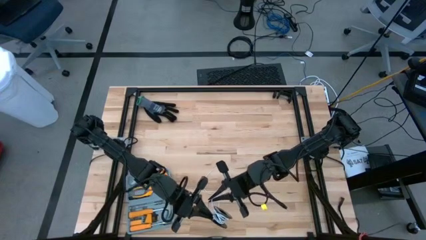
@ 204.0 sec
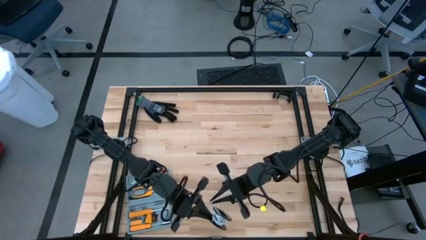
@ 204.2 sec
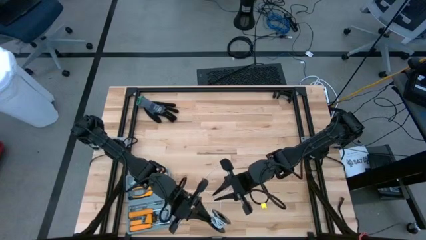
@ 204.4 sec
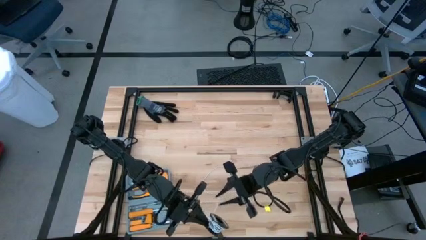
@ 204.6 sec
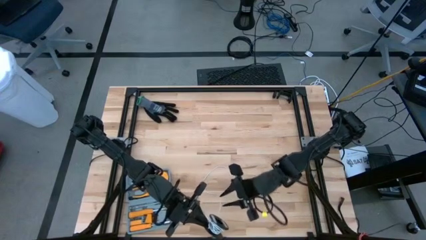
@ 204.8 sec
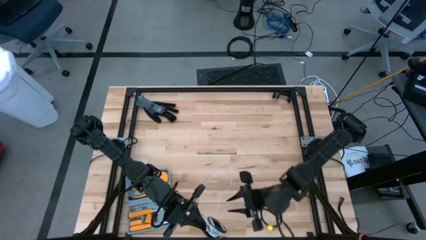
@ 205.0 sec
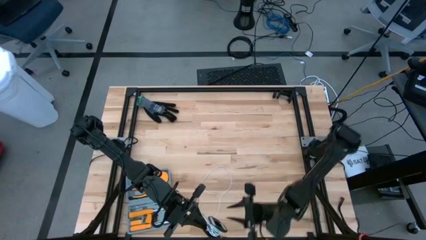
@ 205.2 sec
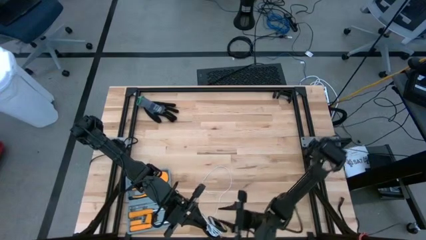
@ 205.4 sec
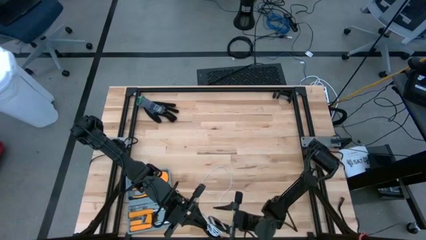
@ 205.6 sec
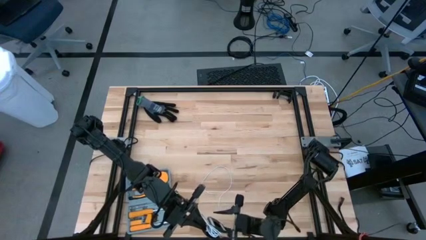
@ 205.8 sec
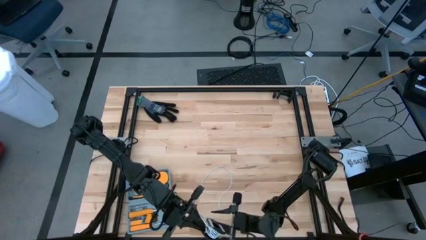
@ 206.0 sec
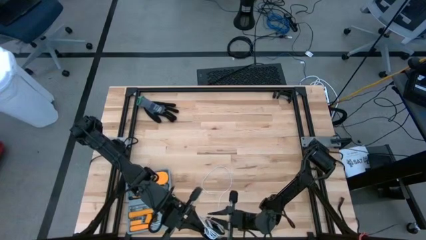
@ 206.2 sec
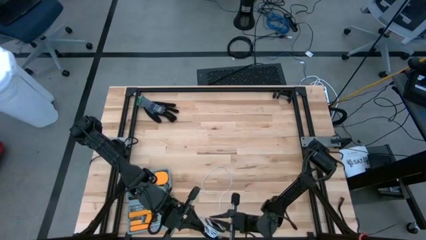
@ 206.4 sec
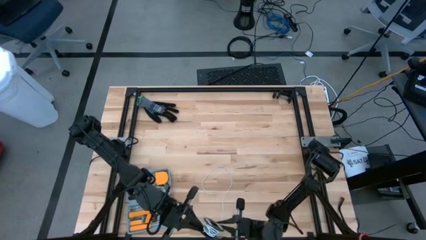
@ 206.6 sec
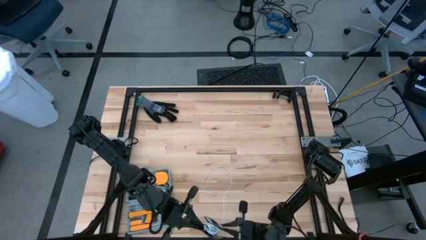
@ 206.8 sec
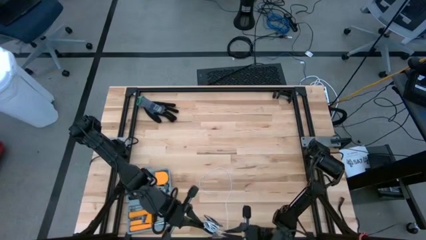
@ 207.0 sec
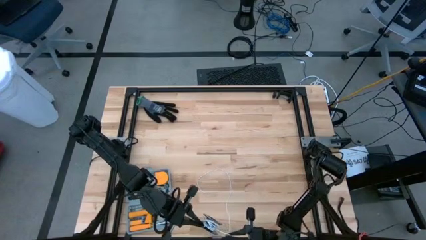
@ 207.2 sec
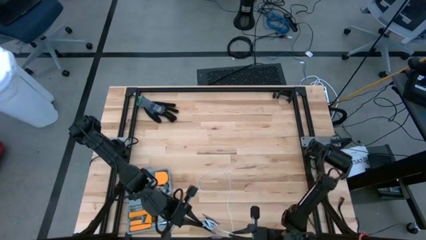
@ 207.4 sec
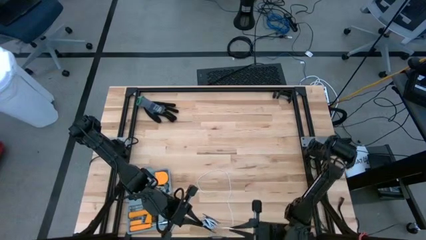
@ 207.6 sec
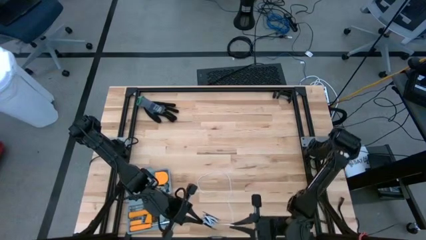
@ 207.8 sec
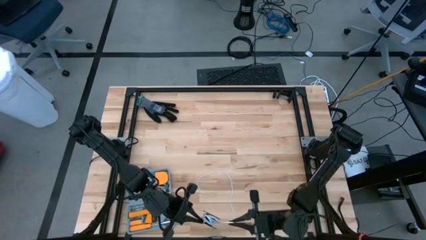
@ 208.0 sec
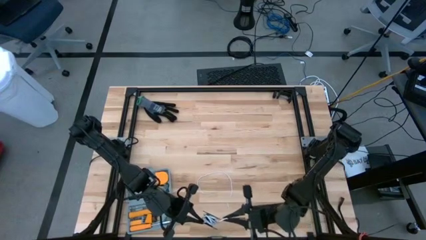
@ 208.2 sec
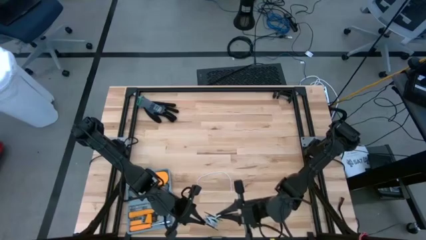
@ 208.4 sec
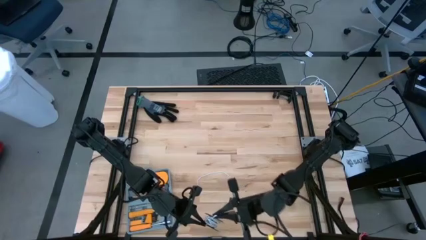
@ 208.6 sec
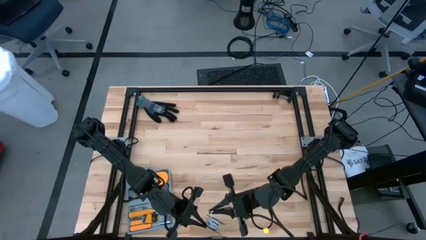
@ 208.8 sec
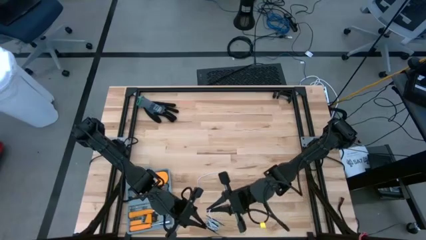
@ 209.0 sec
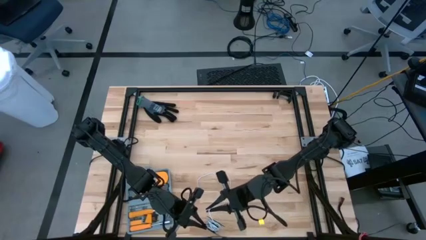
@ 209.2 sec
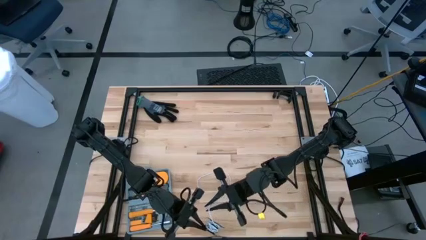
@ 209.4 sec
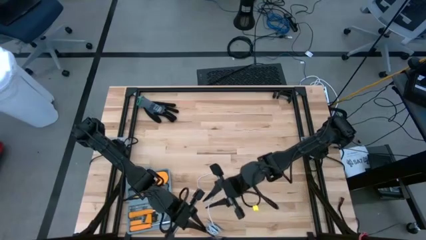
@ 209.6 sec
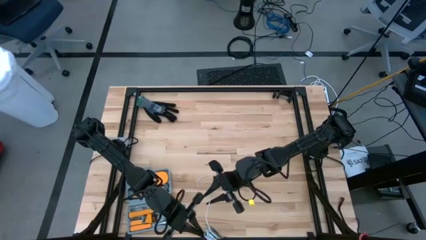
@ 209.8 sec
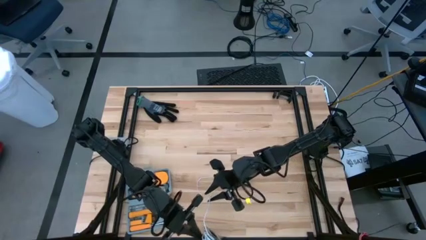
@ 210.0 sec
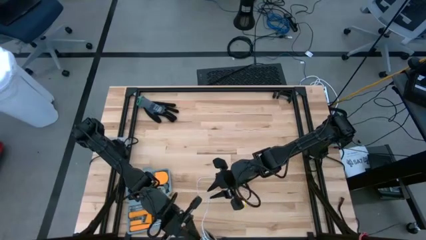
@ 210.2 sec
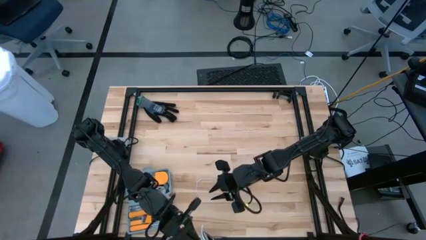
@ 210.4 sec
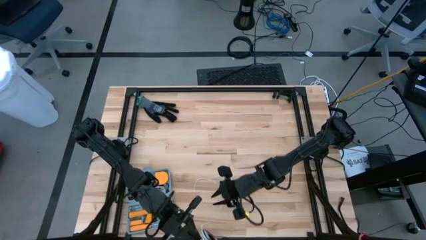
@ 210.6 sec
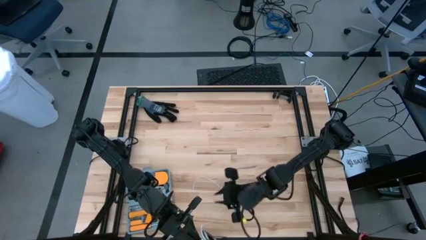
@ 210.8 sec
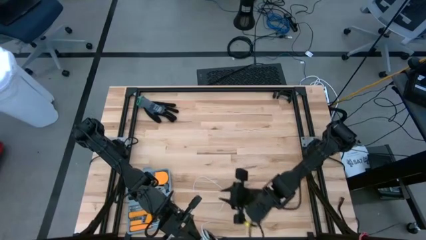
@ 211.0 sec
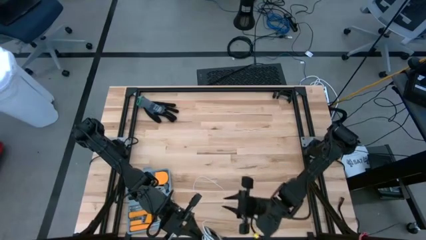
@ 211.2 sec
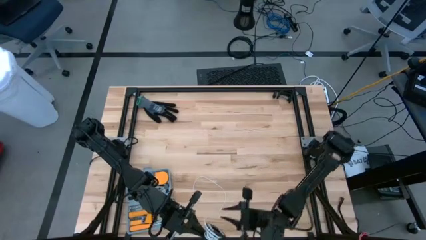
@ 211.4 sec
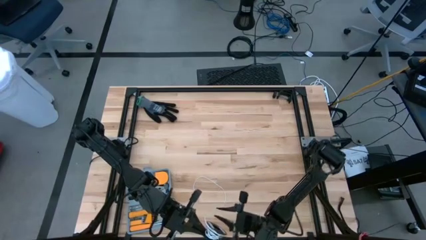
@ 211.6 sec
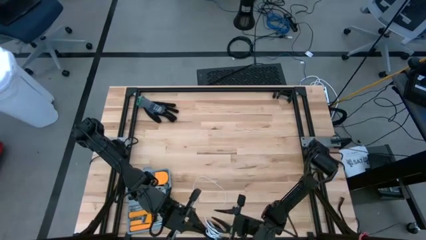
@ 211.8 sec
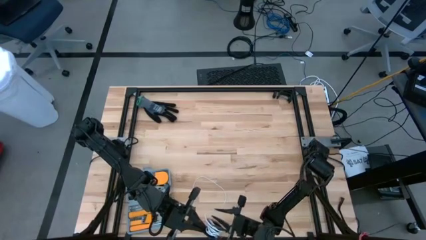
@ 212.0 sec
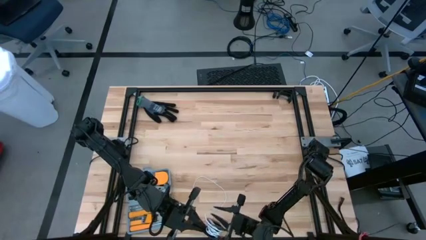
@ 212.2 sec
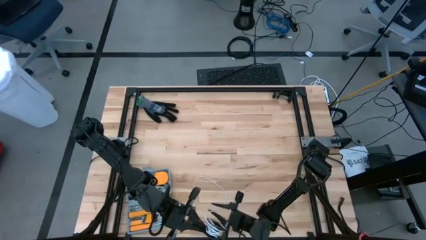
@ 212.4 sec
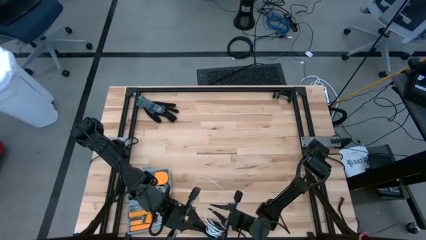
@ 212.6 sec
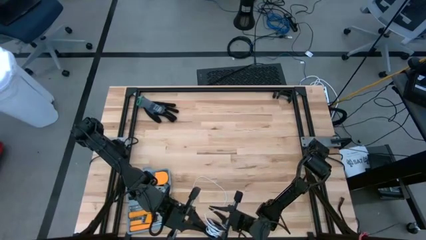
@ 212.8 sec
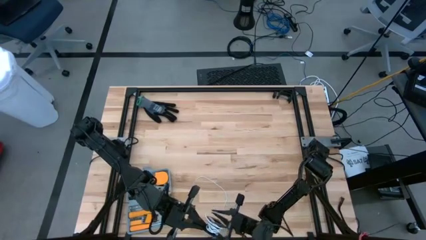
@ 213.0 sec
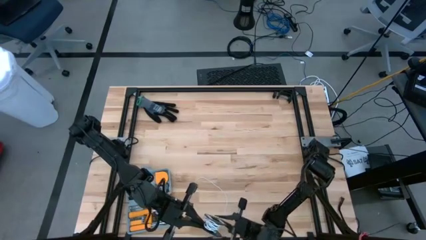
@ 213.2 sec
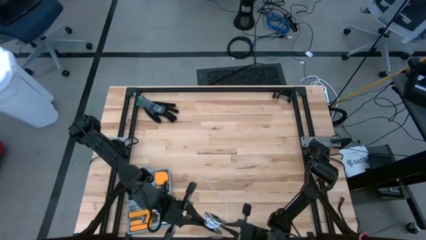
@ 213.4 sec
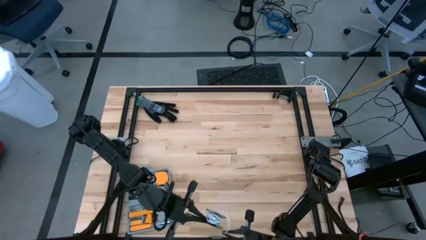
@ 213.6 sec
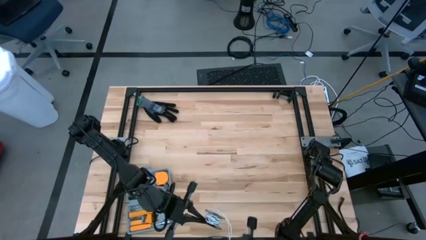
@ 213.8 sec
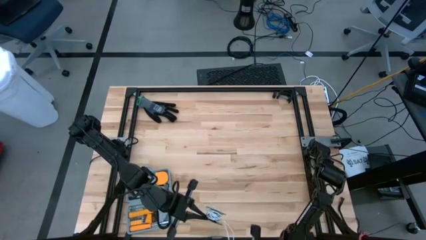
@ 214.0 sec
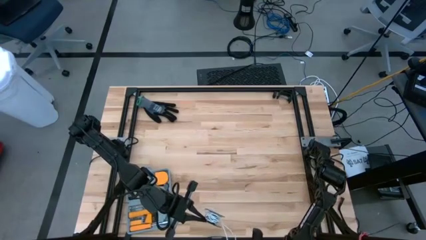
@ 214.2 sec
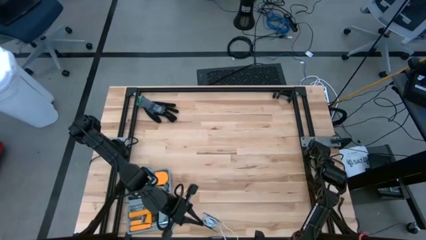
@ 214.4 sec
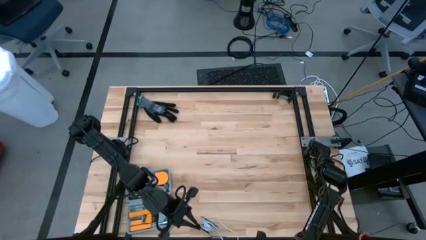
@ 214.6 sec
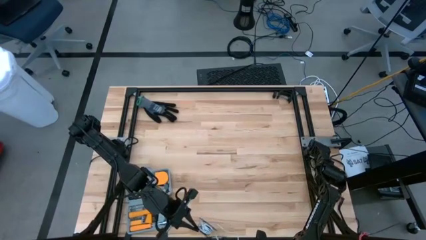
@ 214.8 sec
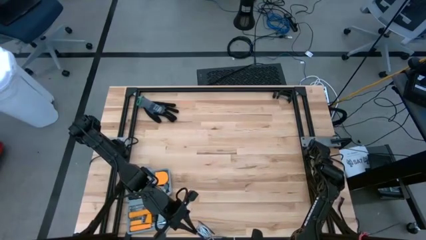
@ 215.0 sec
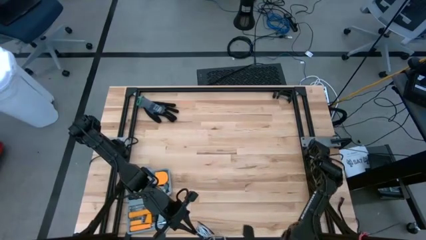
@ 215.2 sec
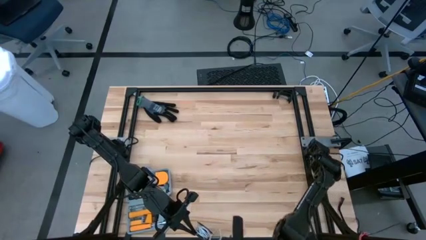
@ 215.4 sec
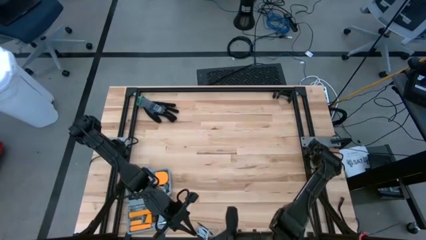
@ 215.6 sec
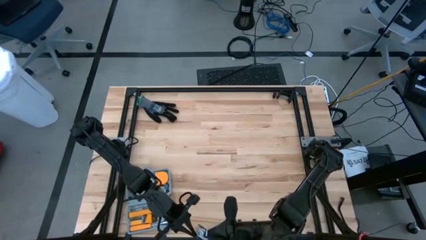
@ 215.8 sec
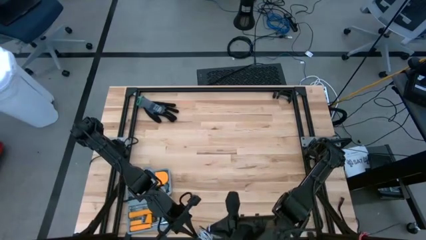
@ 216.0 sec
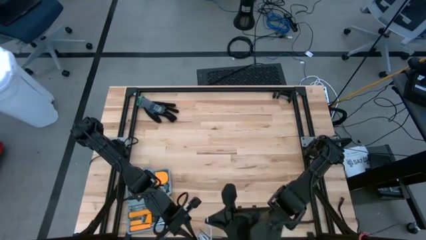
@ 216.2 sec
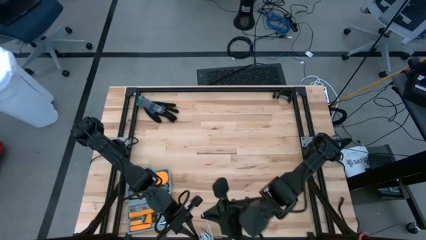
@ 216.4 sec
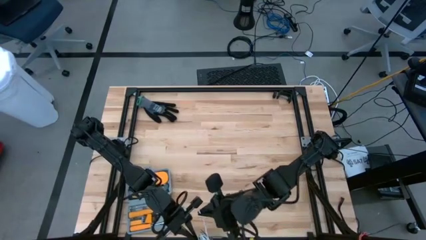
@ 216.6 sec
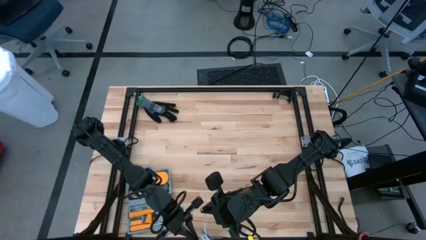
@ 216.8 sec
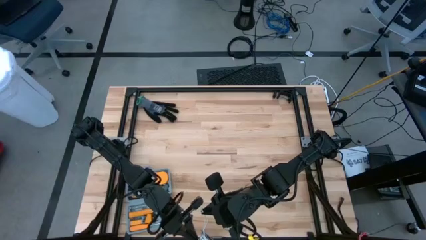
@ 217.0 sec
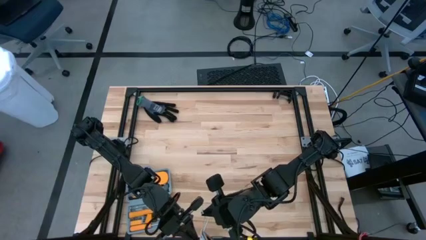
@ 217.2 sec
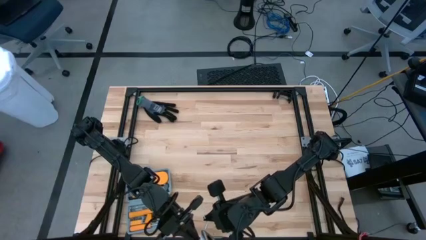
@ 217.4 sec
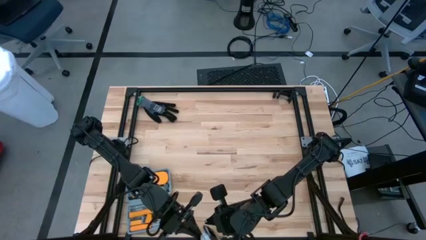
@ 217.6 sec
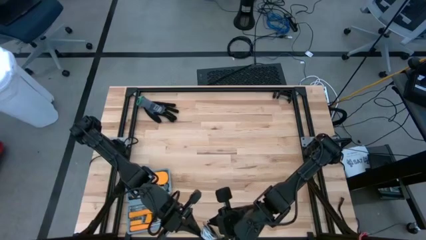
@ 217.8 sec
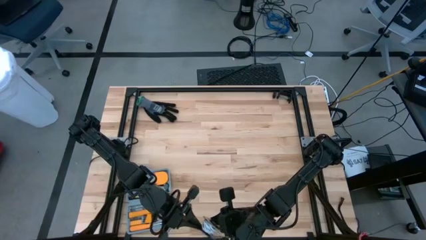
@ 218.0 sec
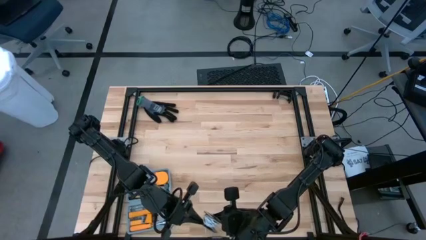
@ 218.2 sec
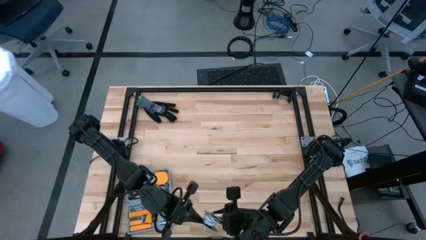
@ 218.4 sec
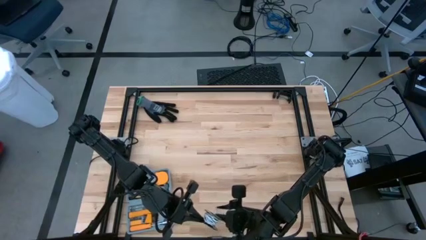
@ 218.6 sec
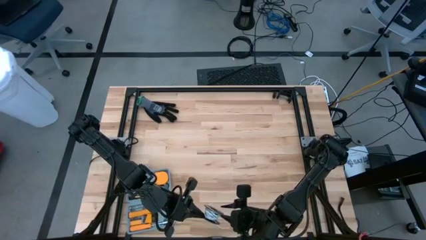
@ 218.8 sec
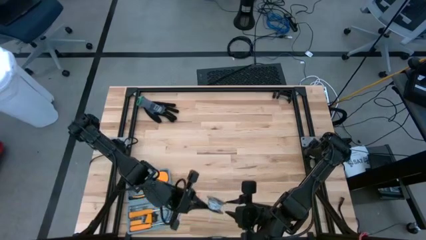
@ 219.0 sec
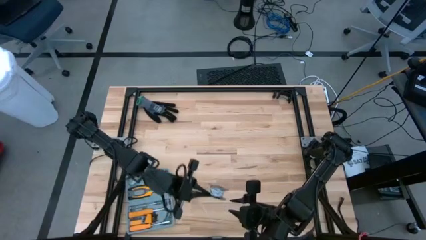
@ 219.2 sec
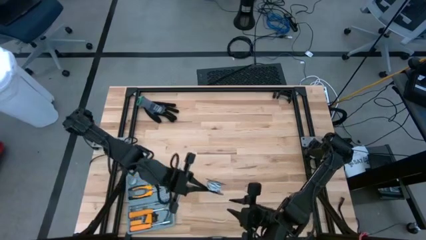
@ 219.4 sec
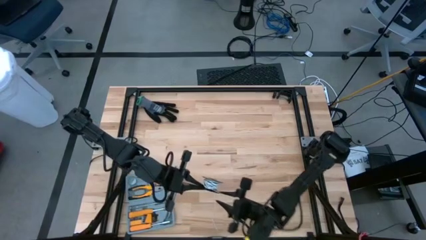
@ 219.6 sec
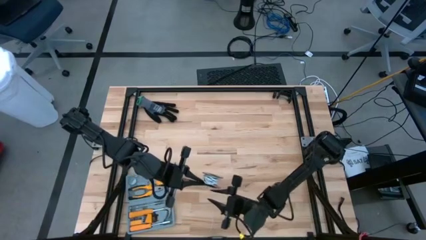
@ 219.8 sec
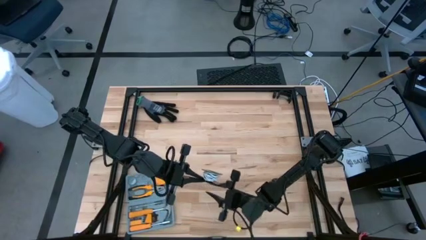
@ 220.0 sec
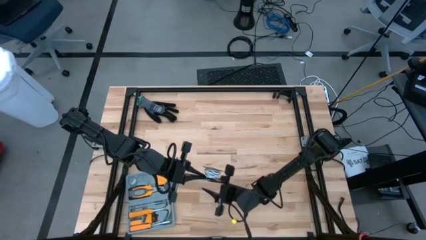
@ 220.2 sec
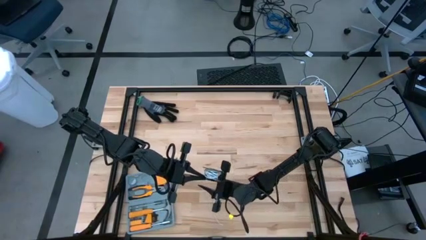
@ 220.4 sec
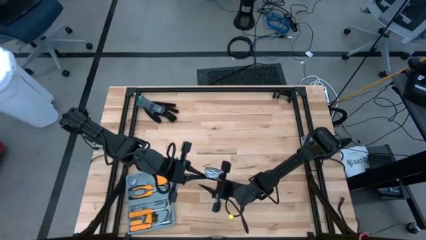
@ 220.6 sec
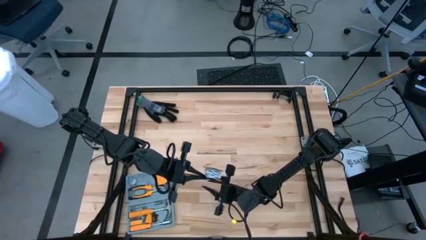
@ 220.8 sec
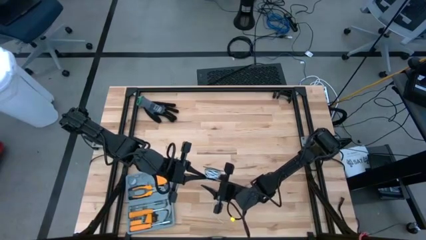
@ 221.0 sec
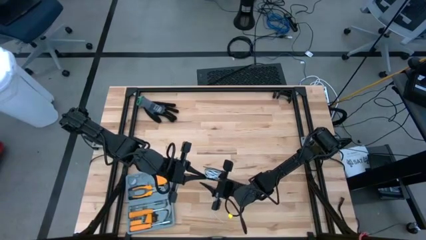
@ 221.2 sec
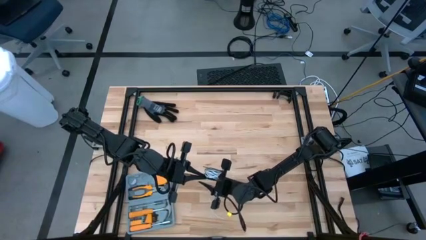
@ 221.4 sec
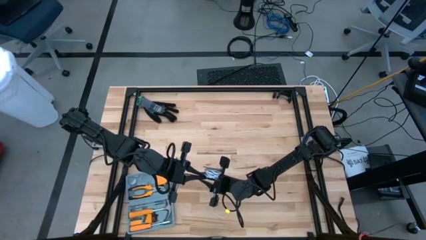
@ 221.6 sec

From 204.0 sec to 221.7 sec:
Task: Coil cords
Coil the white cable wire into the spool
